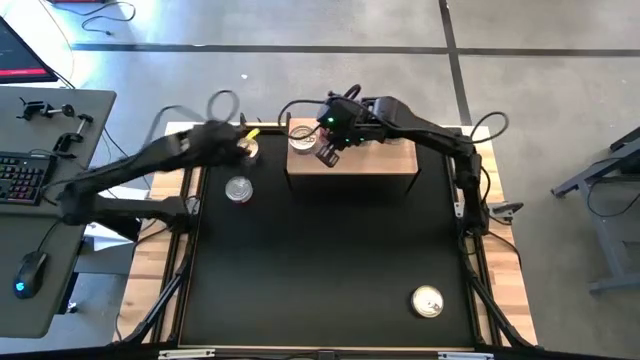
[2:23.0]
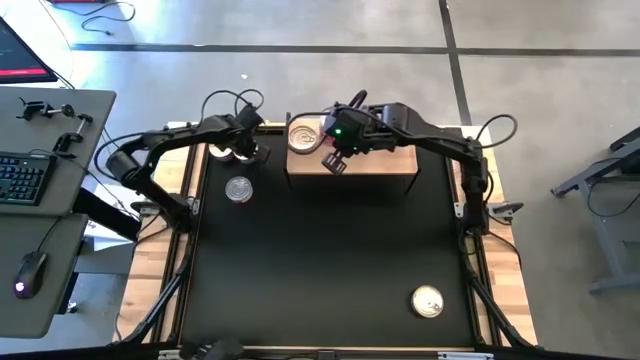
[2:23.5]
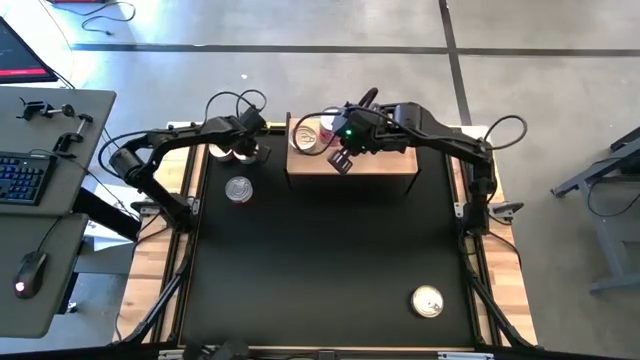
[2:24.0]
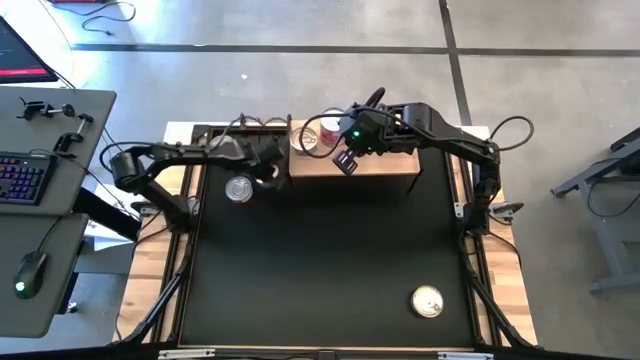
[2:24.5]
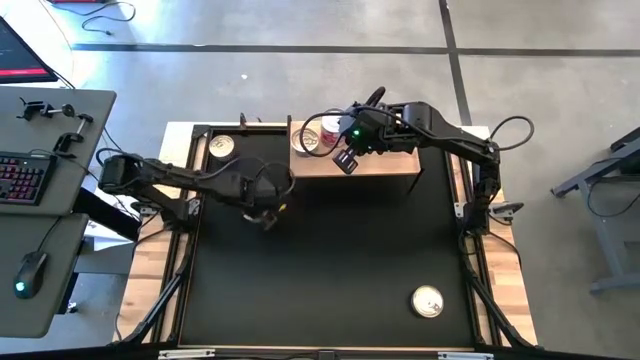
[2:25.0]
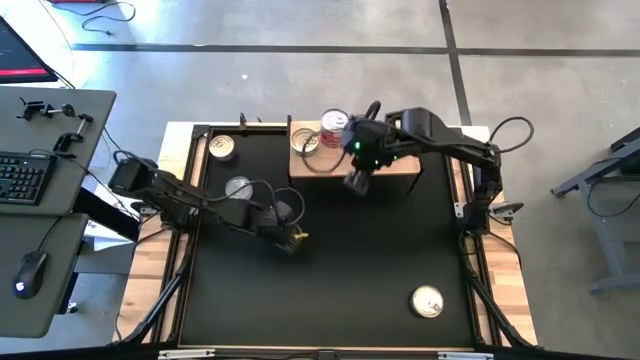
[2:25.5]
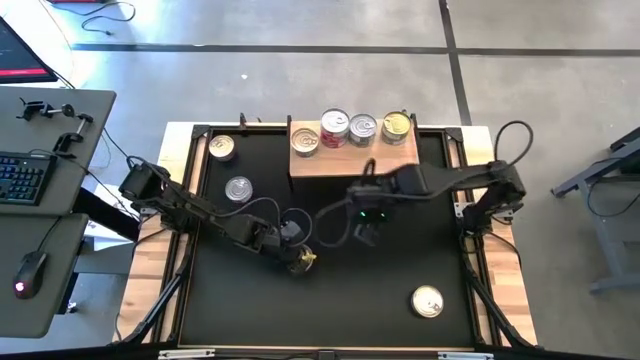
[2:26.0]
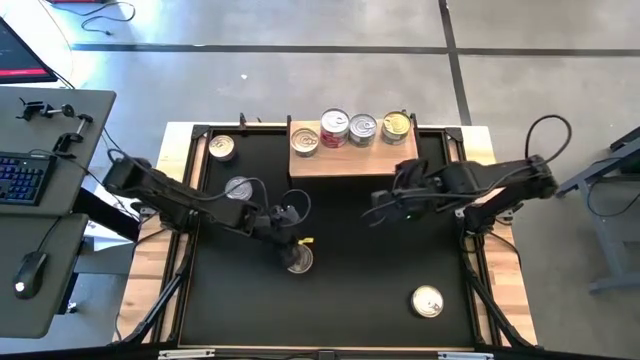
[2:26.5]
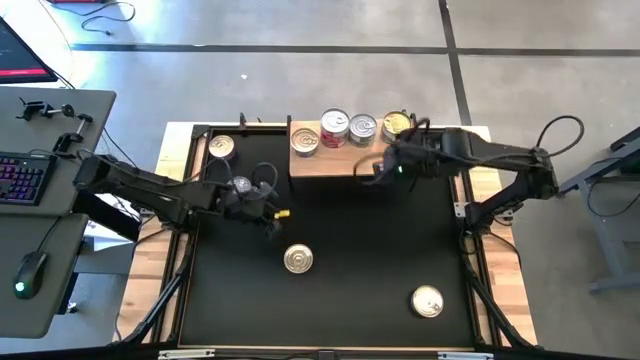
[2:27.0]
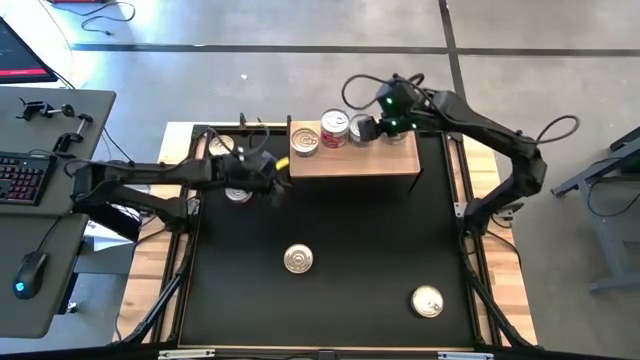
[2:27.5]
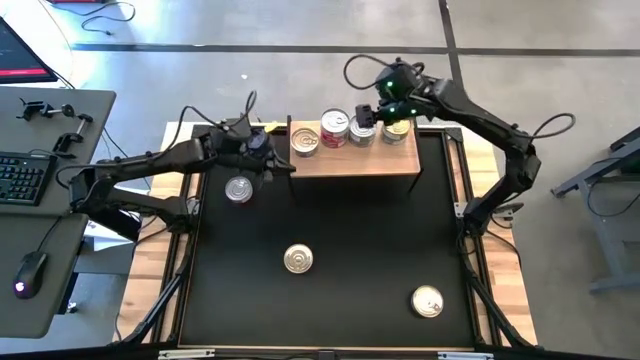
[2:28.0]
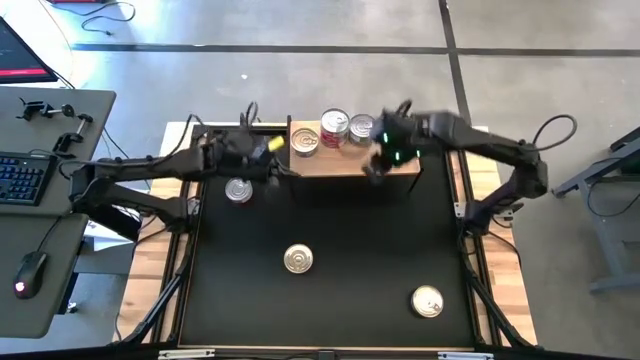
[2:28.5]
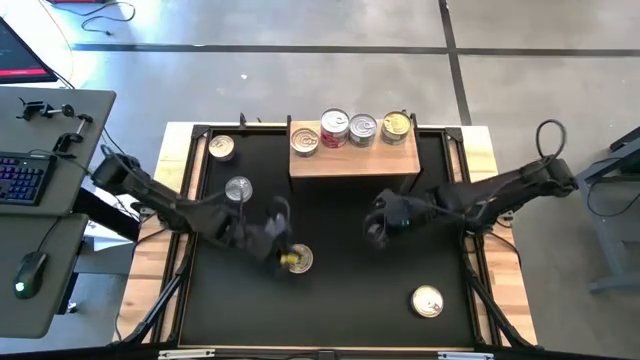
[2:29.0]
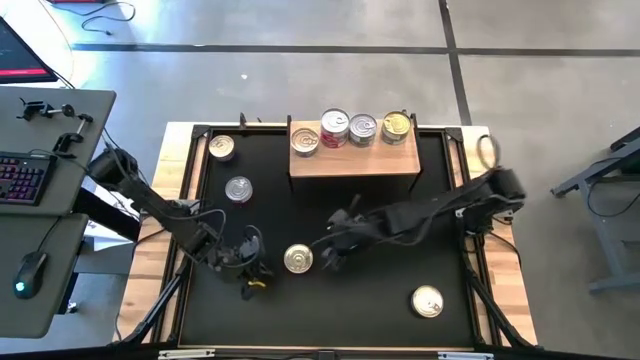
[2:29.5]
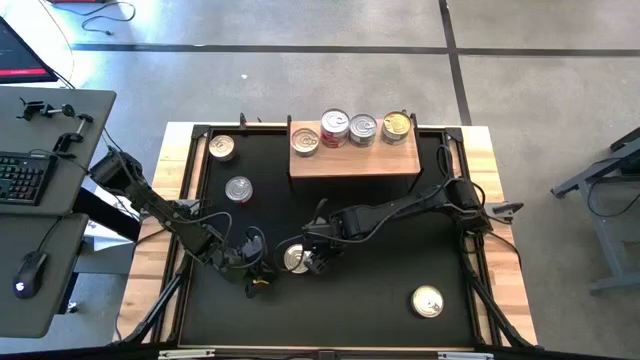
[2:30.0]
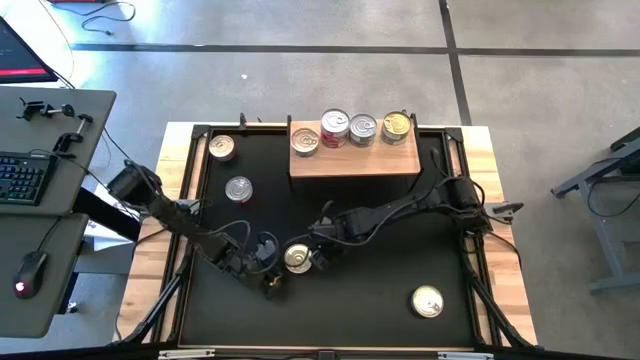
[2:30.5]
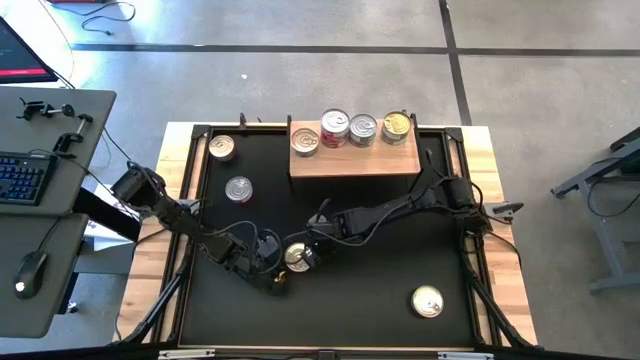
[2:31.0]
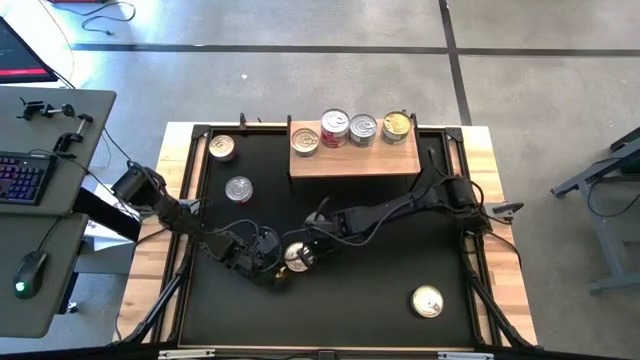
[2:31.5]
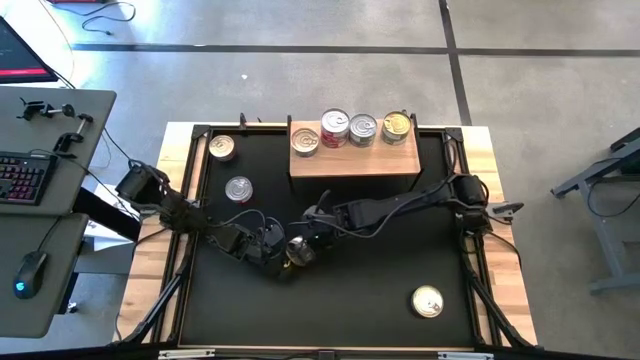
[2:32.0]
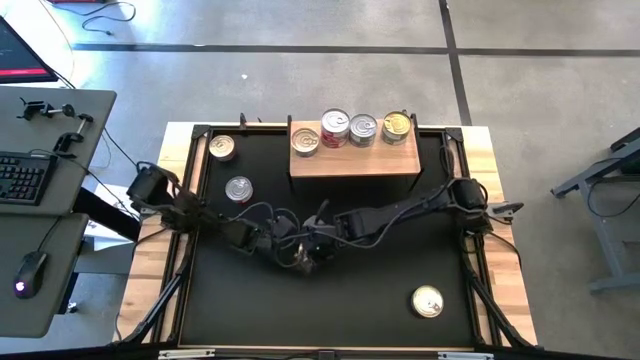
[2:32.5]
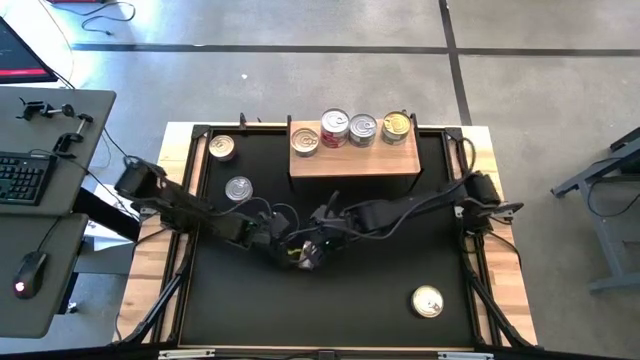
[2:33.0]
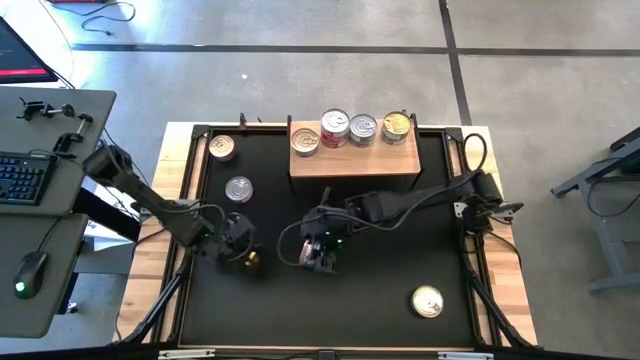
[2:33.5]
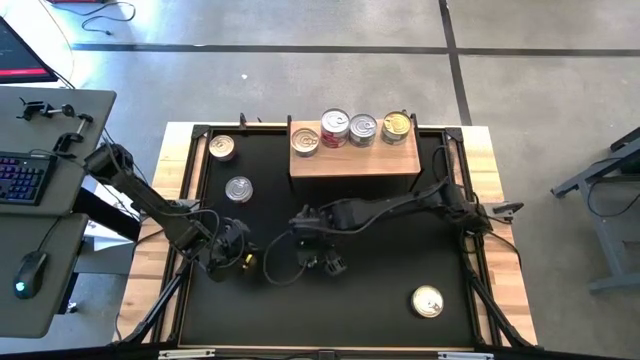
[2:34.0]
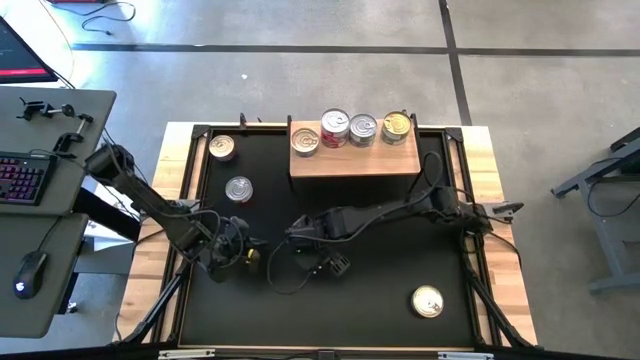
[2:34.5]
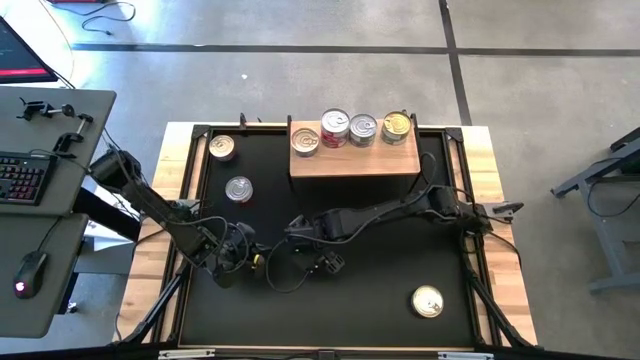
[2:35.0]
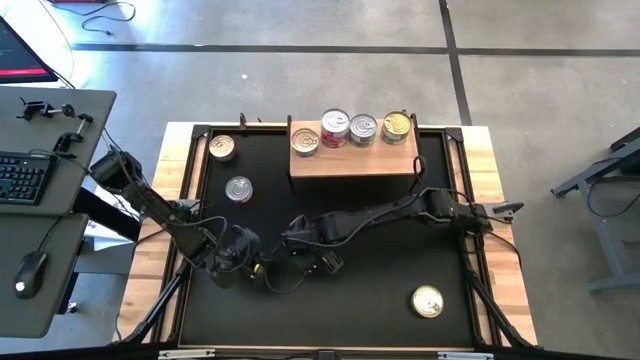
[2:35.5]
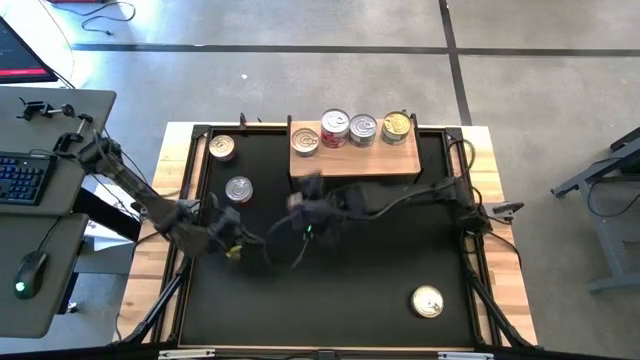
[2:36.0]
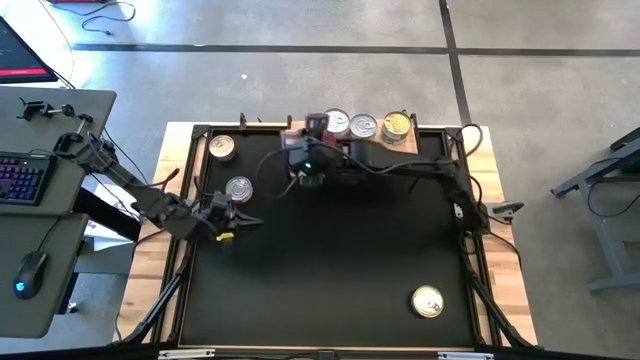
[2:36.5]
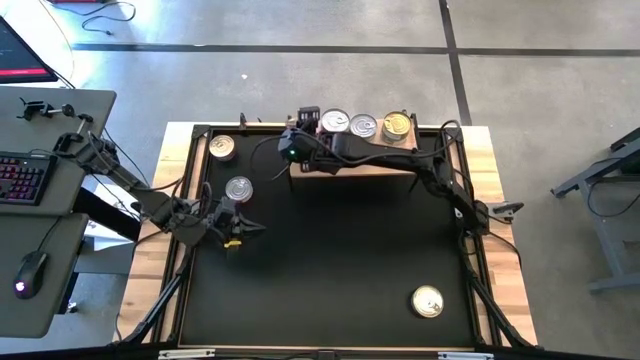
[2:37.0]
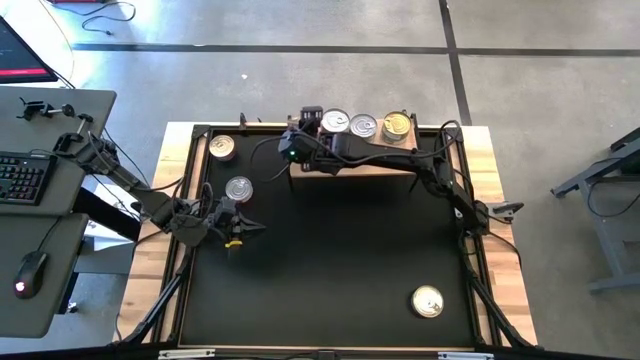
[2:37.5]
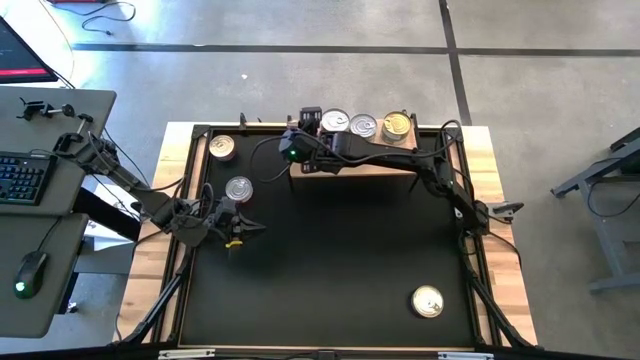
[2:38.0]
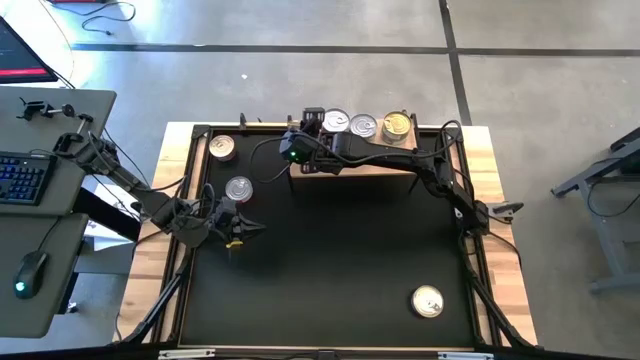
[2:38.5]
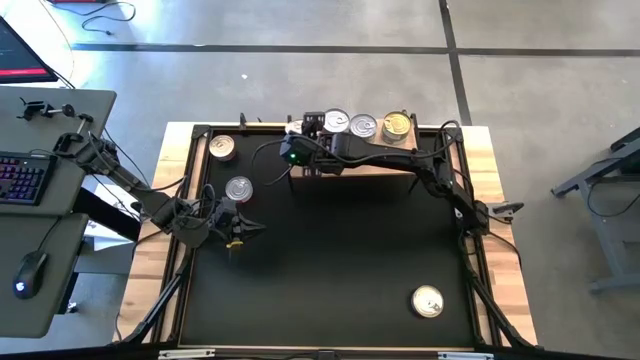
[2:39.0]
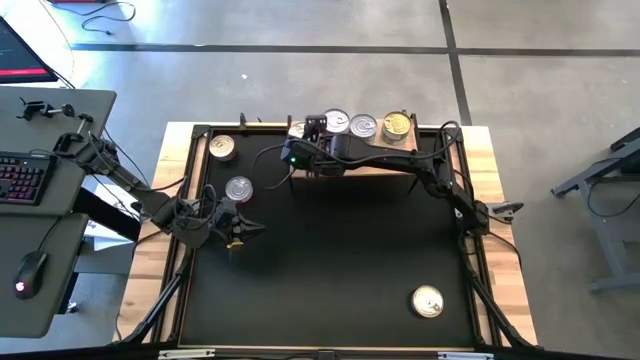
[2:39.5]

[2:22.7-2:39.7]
Task: Stack canned seafood by type on shelf
Stack the blue-pink tuna can on top of the blue pink tuna can on the shelf

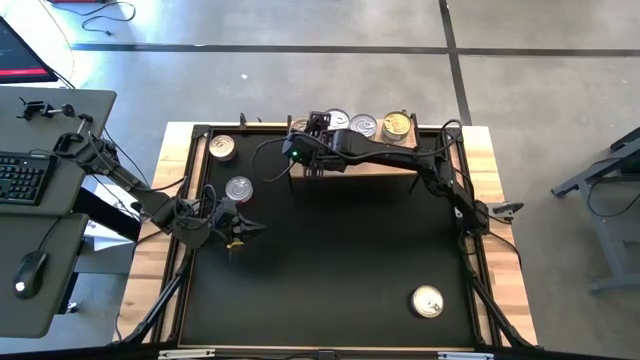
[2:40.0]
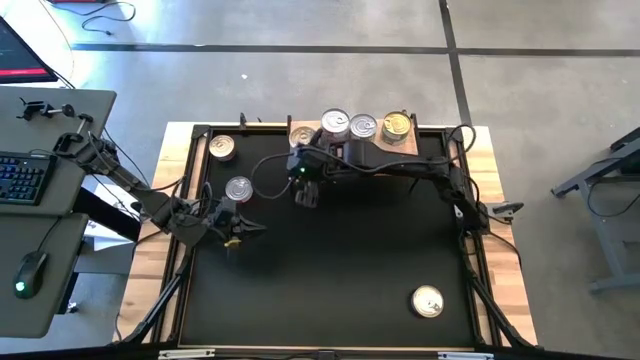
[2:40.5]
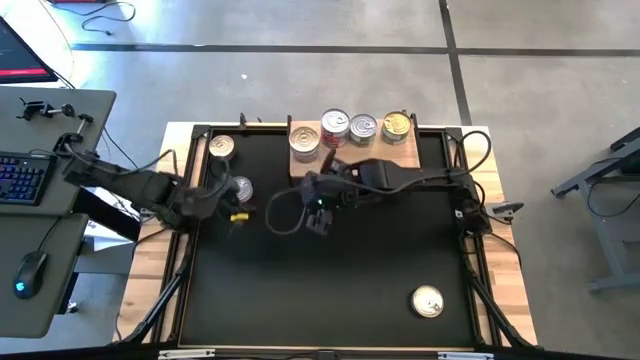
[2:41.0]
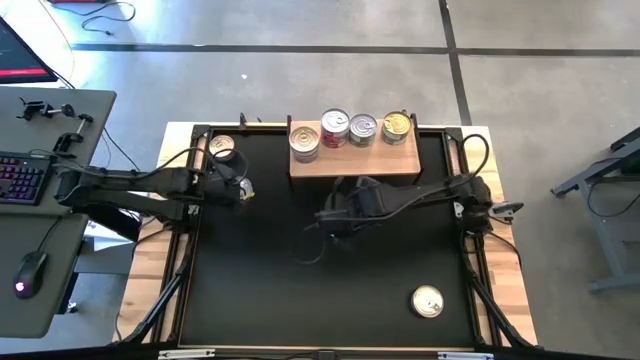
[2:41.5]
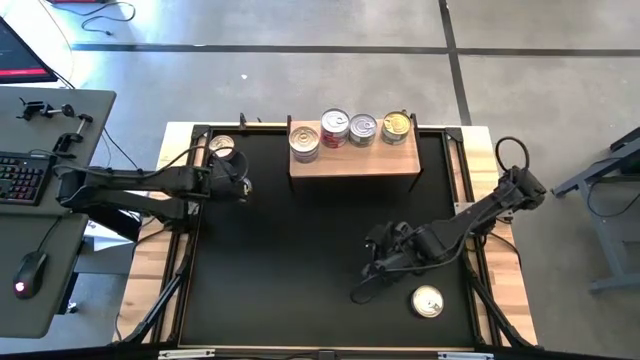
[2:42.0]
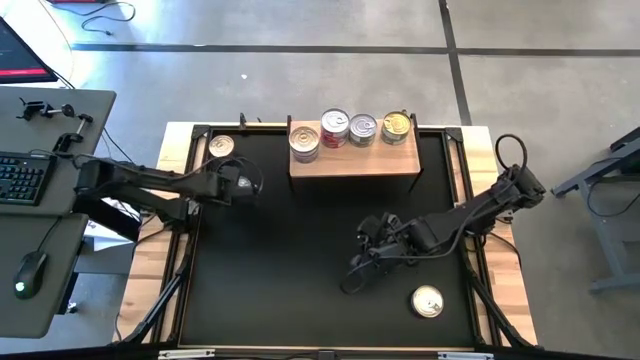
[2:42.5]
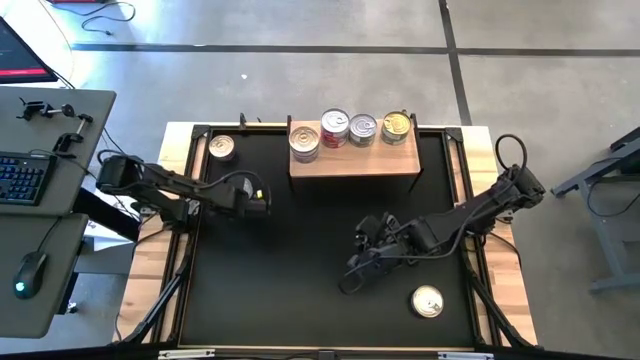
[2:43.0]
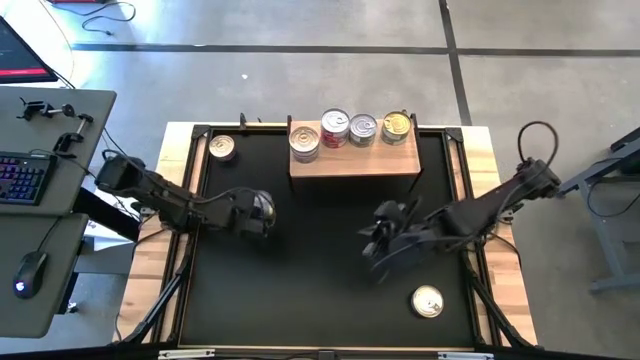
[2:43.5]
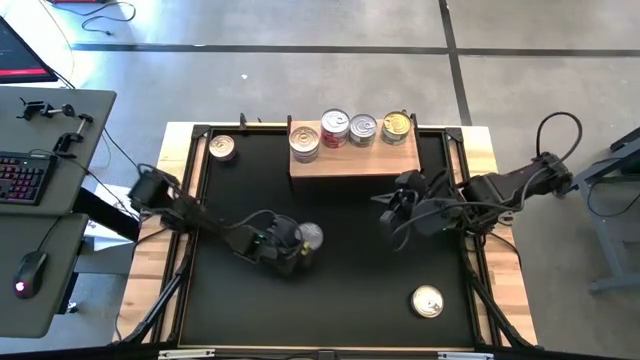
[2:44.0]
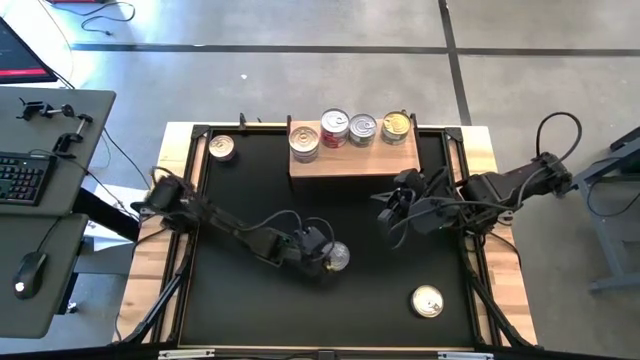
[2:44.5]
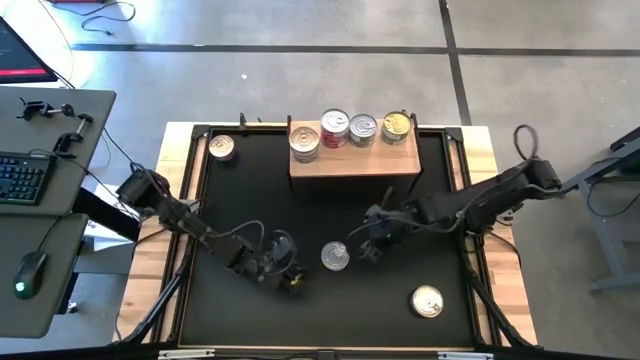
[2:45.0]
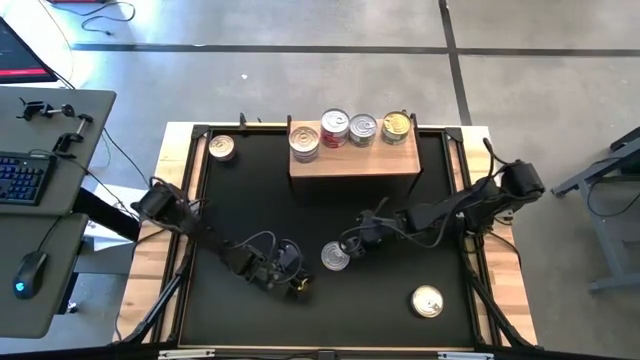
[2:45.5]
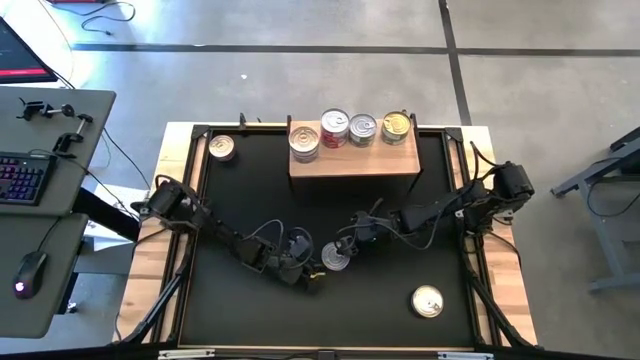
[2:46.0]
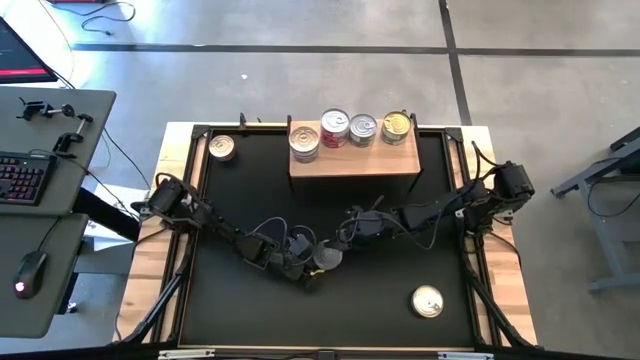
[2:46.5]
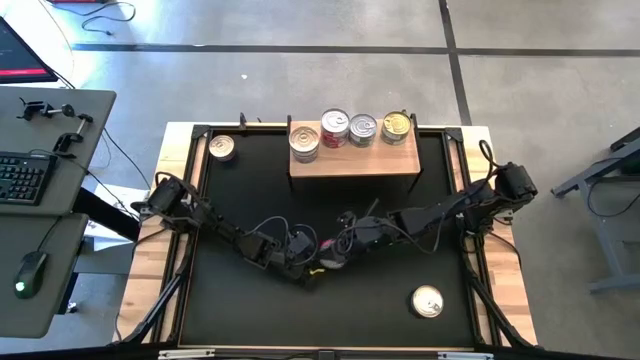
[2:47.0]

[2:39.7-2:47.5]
Stack the red tuna can on top of the red tuna can on the shelf
